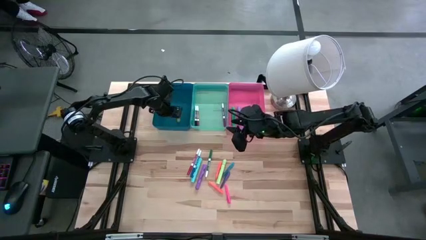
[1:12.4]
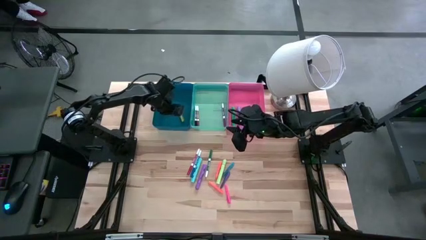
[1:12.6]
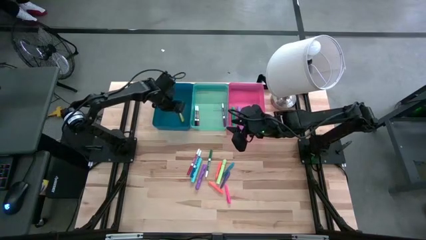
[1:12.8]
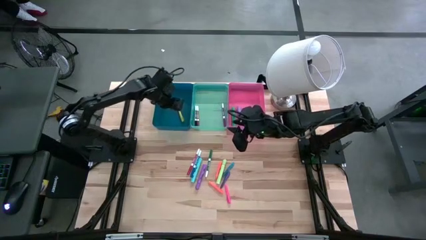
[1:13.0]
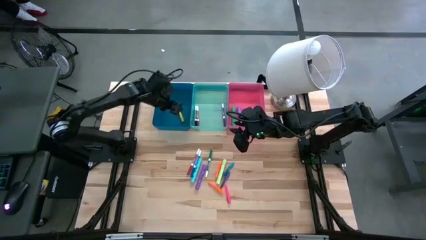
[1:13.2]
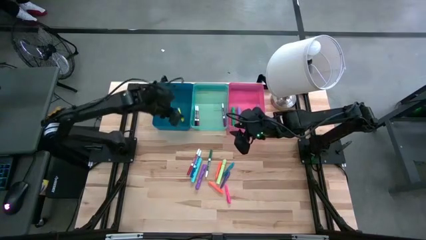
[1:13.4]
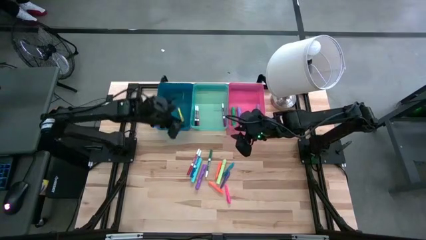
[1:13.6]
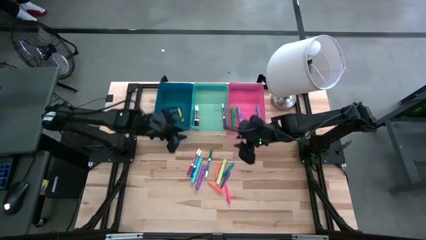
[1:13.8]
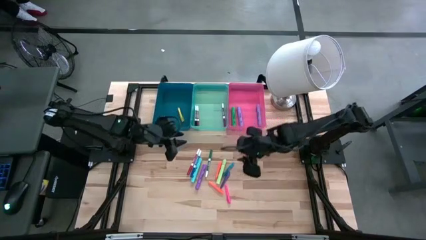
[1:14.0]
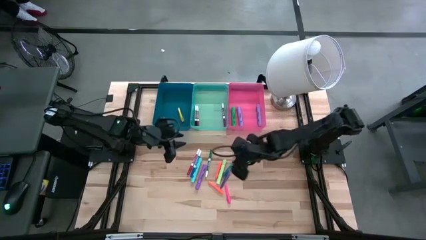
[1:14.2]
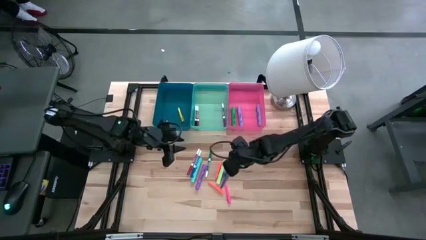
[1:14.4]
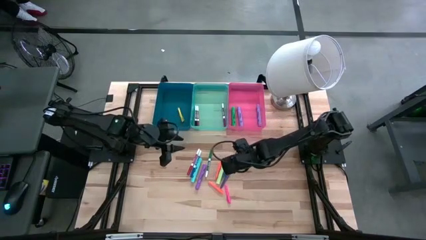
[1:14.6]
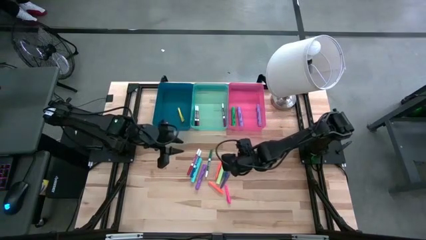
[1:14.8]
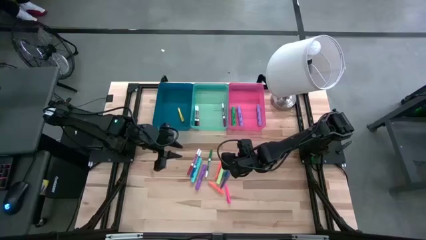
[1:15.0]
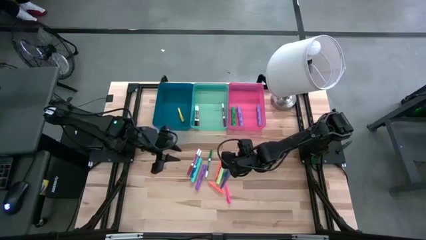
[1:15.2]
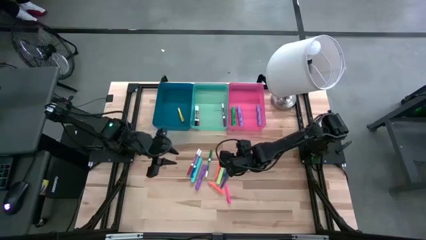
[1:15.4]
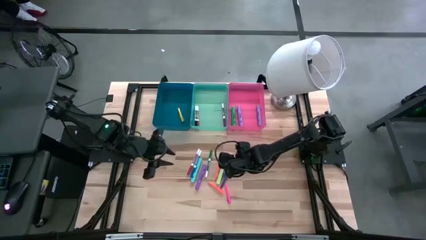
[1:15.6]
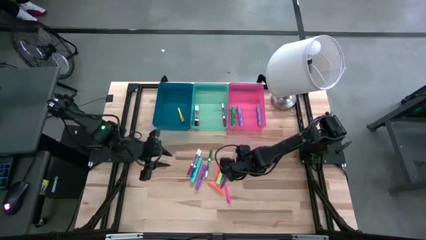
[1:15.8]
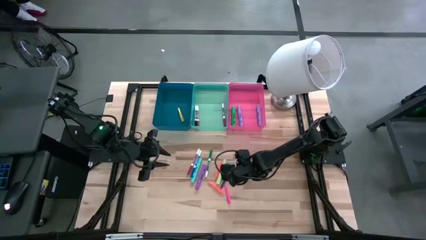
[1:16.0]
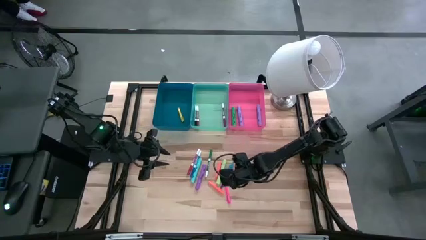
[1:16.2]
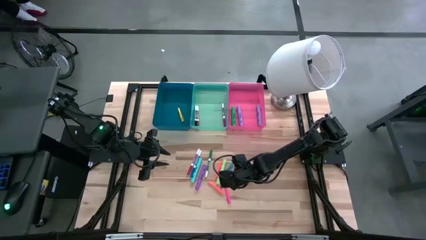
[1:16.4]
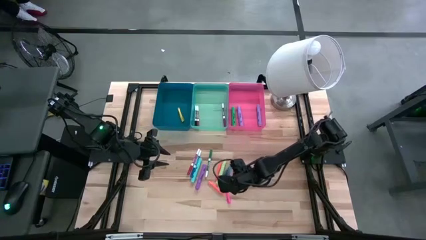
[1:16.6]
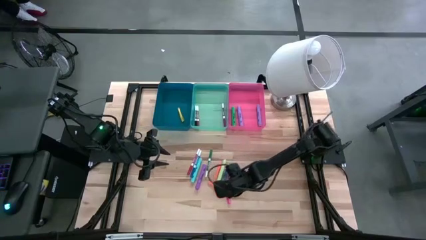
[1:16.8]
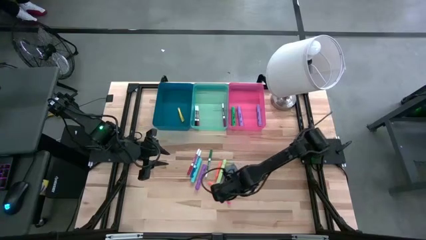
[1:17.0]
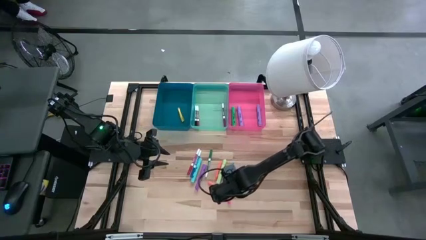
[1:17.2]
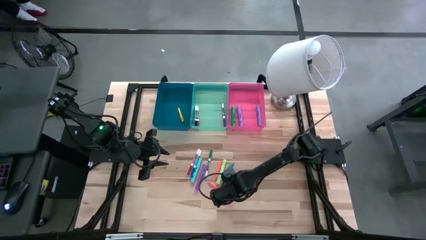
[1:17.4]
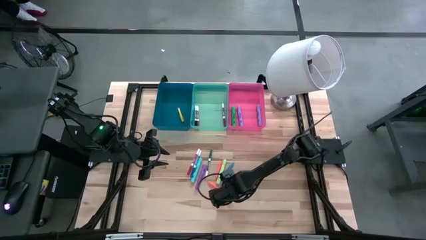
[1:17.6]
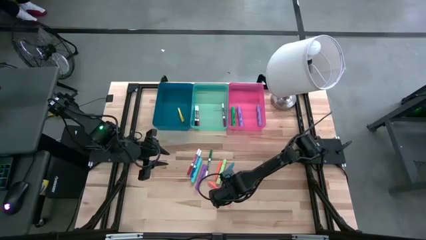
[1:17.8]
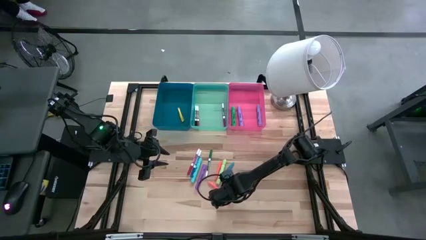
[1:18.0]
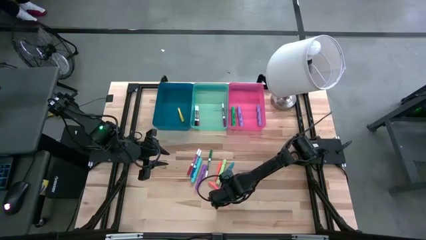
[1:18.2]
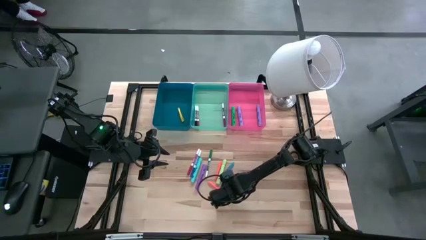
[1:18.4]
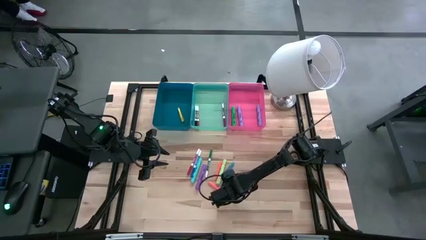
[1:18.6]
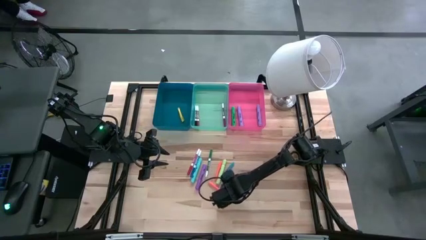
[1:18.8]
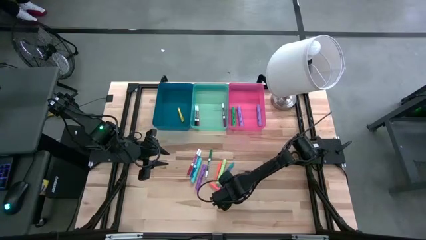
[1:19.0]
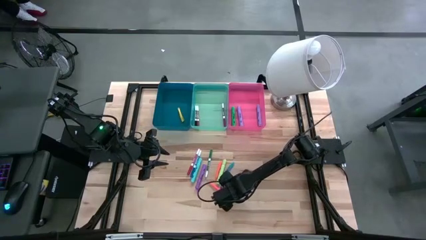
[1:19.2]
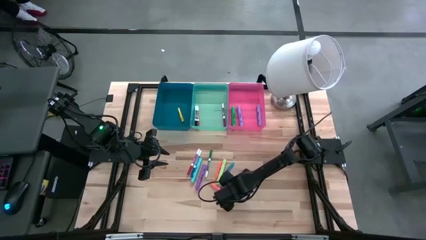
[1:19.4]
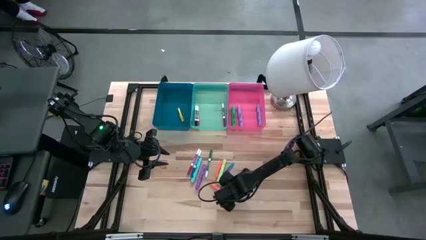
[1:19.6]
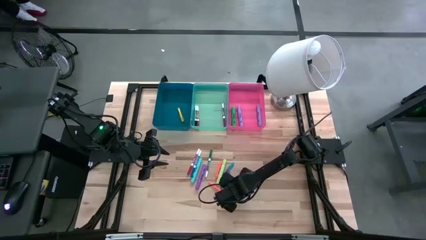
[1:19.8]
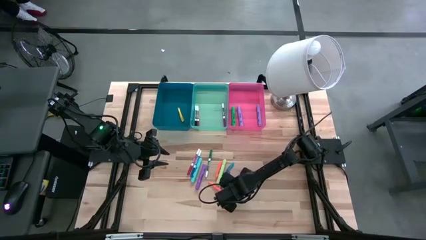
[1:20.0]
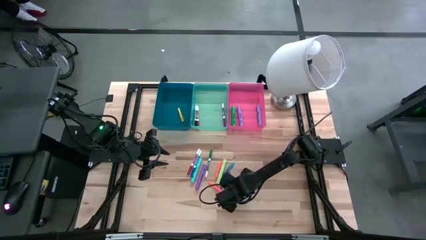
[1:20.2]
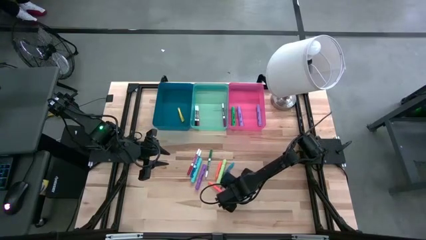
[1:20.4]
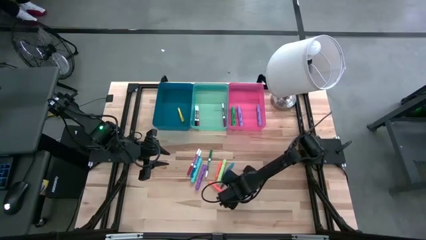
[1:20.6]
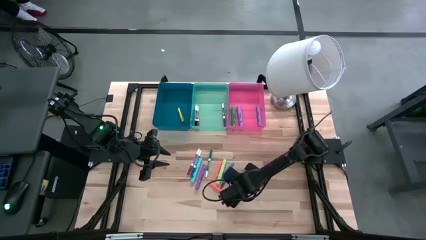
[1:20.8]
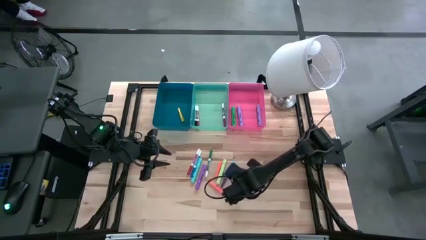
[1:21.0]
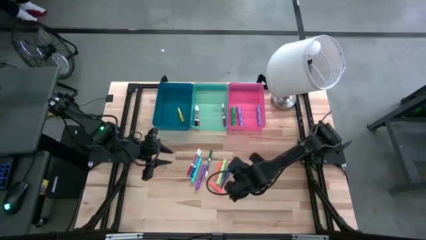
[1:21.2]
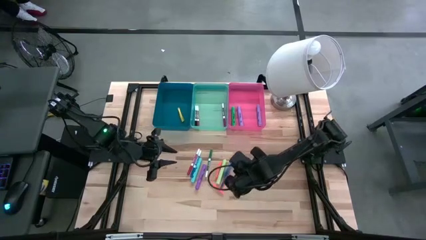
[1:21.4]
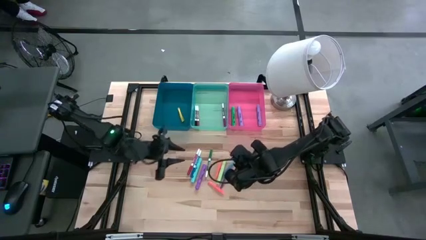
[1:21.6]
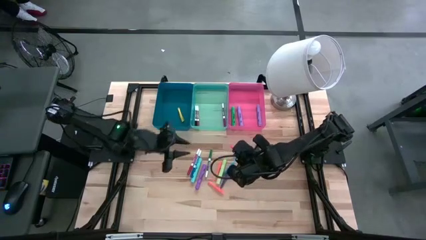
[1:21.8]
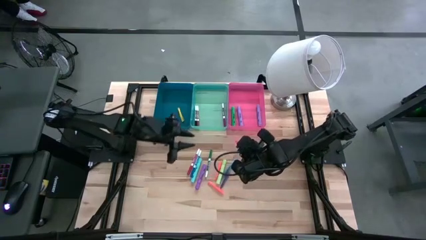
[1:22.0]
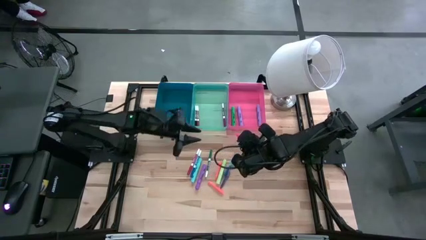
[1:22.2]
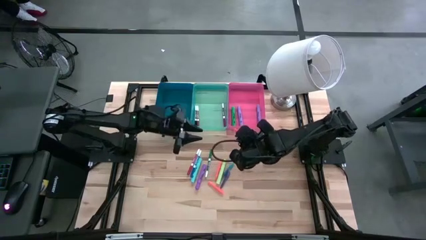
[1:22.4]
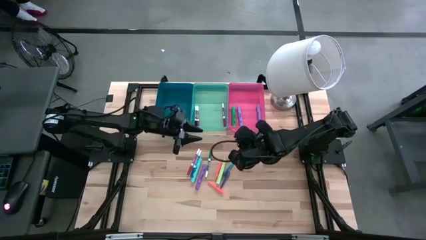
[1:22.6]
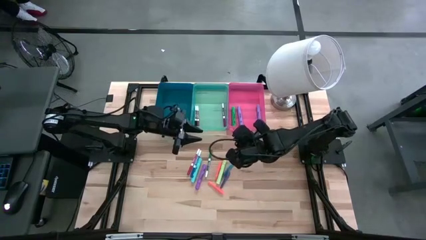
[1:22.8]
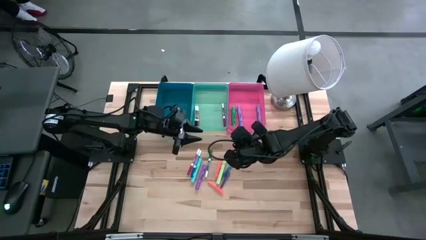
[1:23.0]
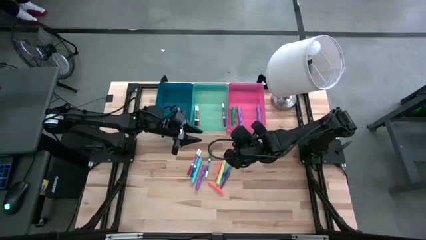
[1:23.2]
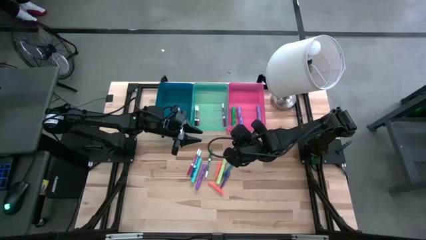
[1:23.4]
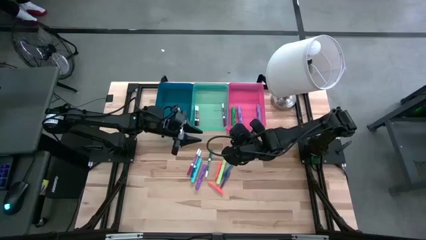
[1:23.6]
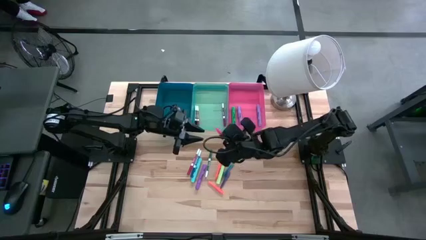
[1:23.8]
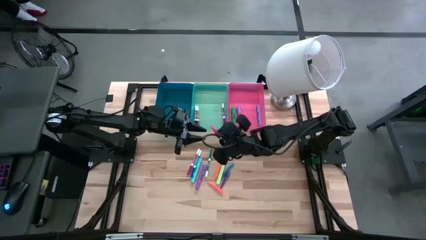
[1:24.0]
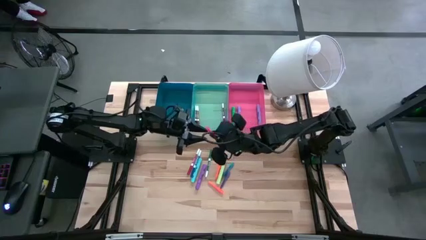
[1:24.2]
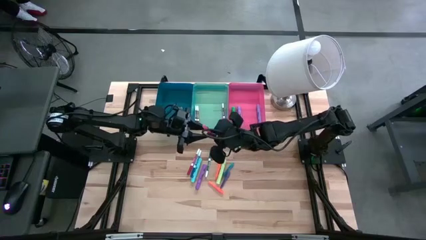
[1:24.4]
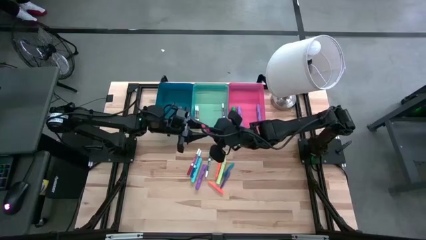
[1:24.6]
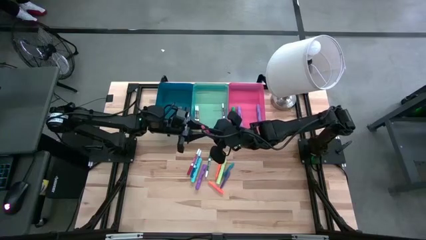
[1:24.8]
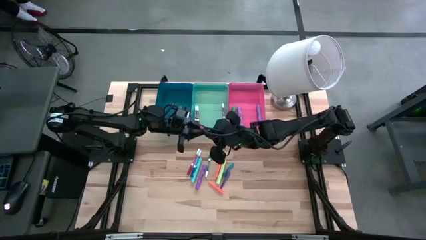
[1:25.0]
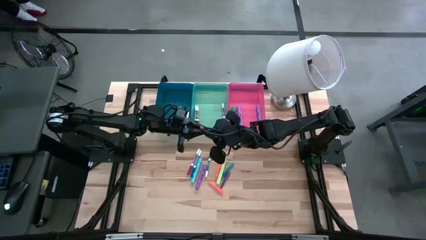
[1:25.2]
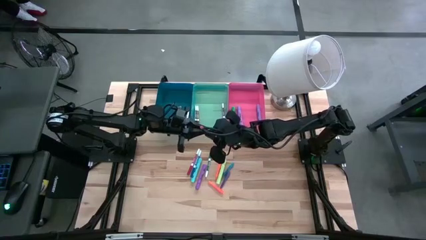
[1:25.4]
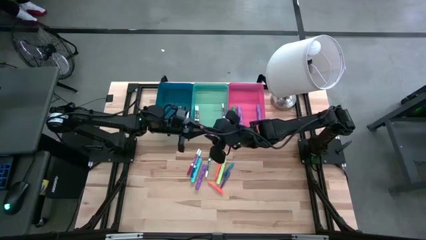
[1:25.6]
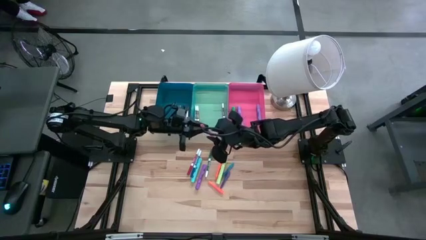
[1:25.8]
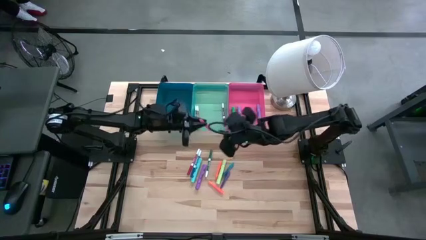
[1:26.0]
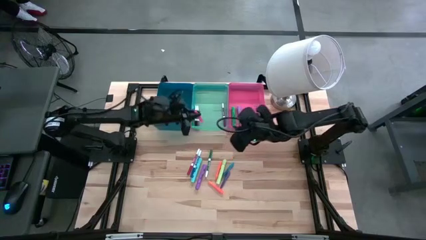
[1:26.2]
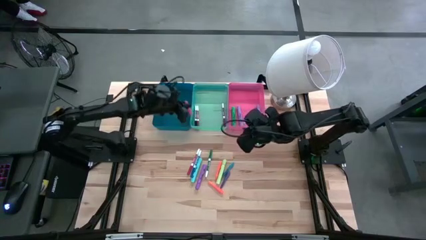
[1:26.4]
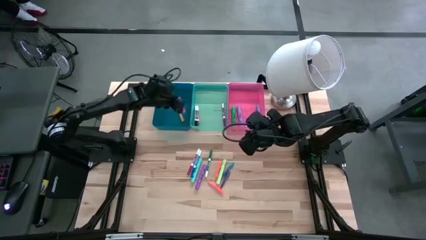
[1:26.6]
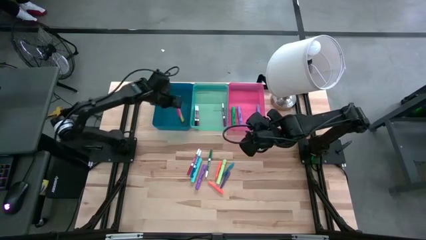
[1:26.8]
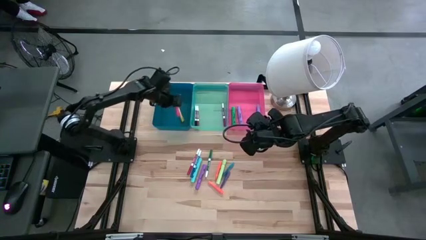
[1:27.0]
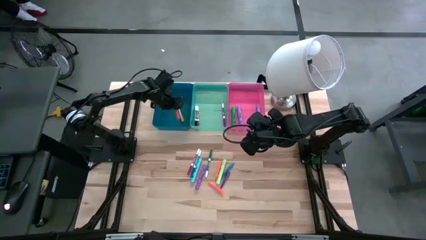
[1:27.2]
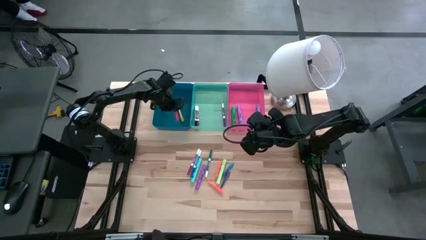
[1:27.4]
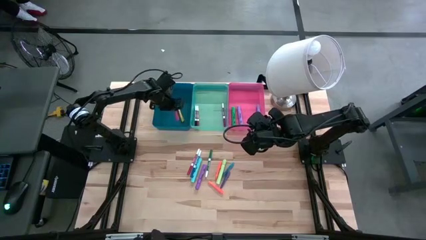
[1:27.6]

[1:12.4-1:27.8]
Task: Pick & Place Markers
Put the pink pen into the blue bin

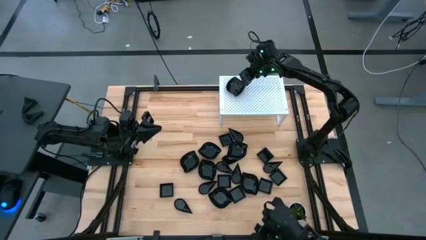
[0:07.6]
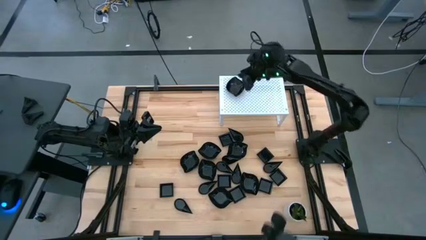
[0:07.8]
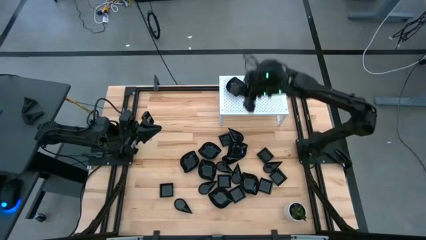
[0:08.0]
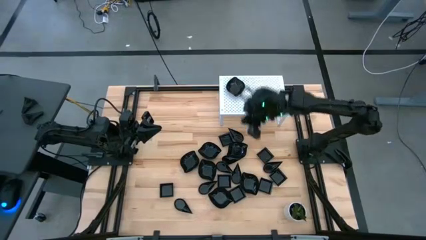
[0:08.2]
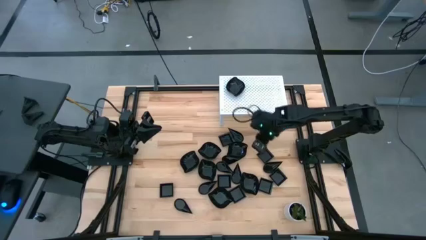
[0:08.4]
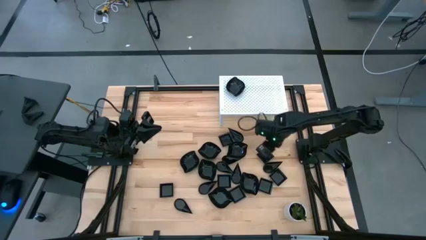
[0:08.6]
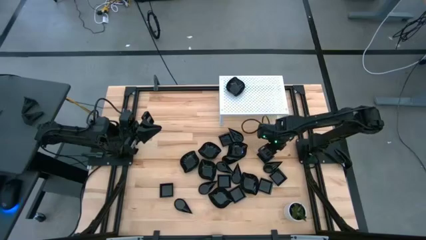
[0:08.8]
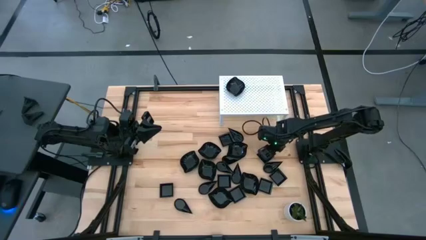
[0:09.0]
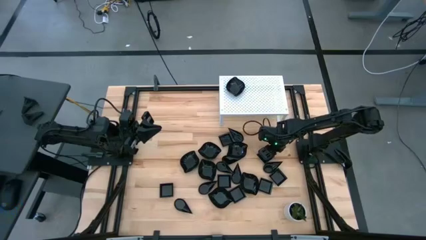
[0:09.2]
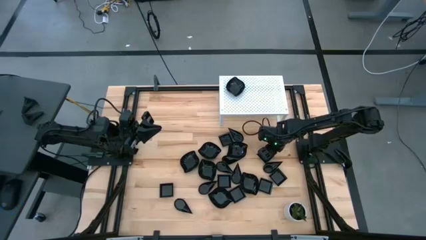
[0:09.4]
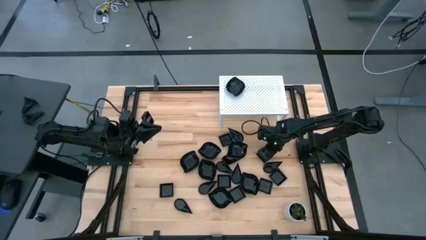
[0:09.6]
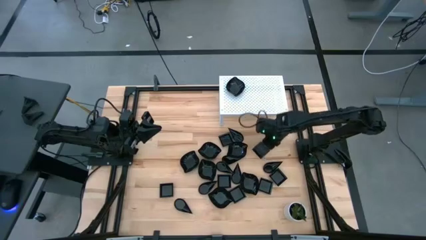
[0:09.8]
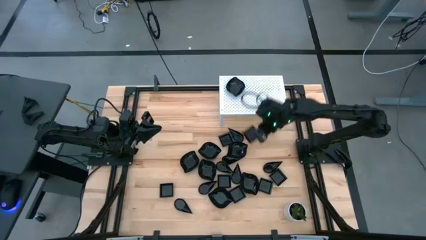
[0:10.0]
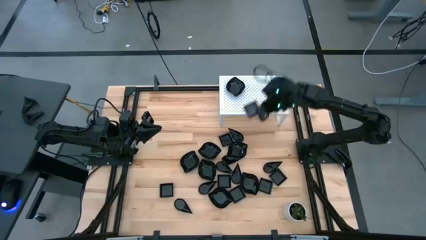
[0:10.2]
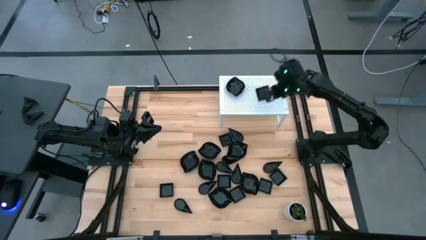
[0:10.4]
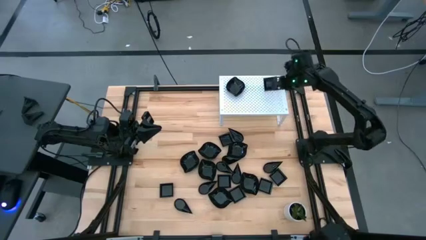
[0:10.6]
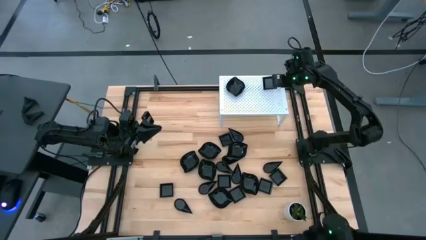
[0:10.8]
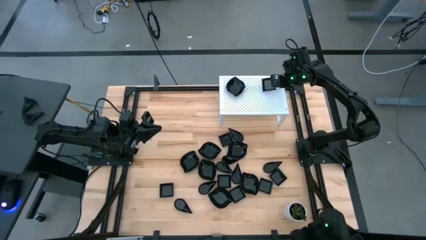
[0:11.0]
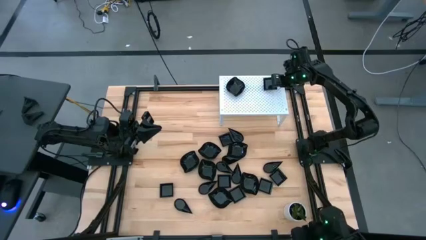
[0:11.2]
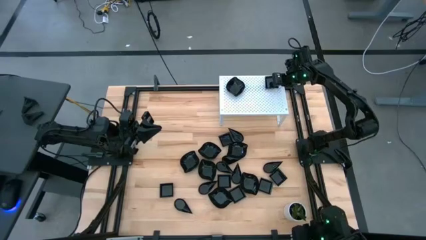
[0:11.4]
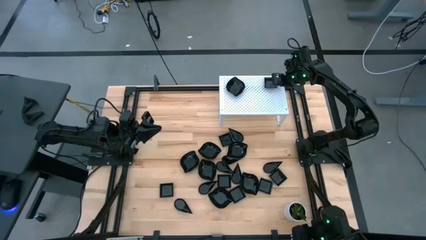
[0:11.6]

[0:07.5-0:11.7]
Task: Pick & Place Mini shaped plates
Put the square plate on the shelf
